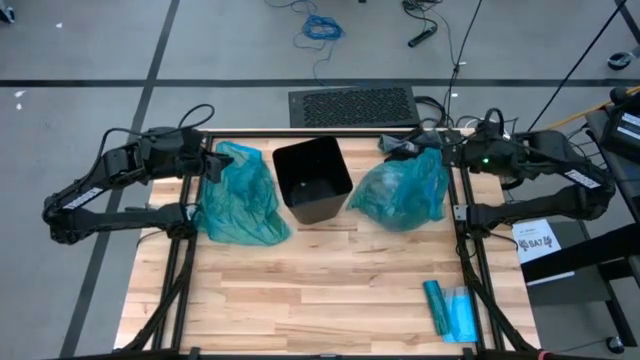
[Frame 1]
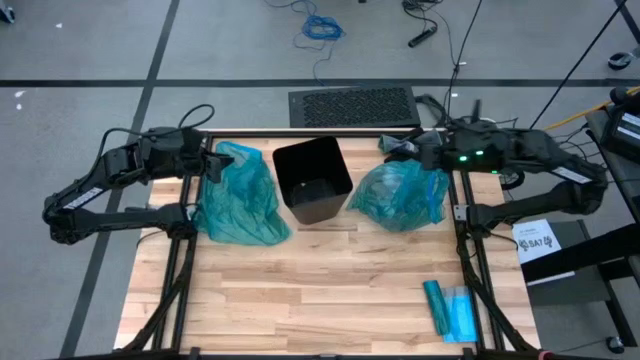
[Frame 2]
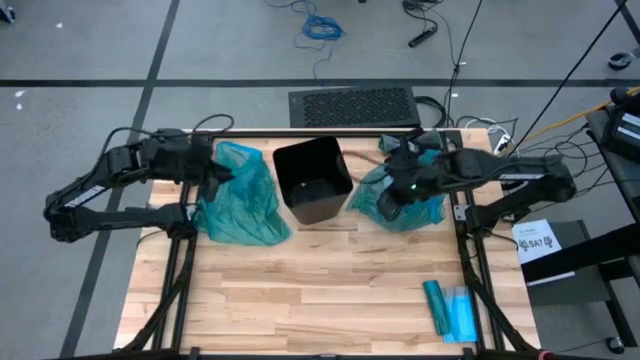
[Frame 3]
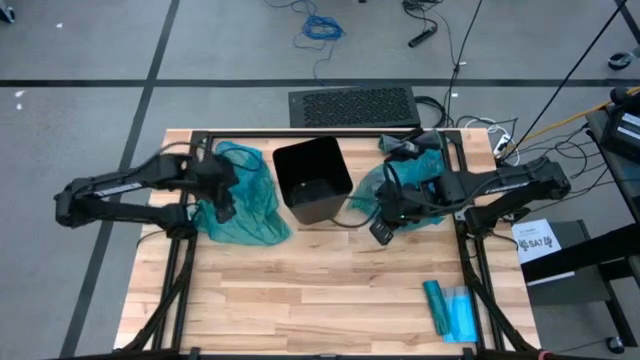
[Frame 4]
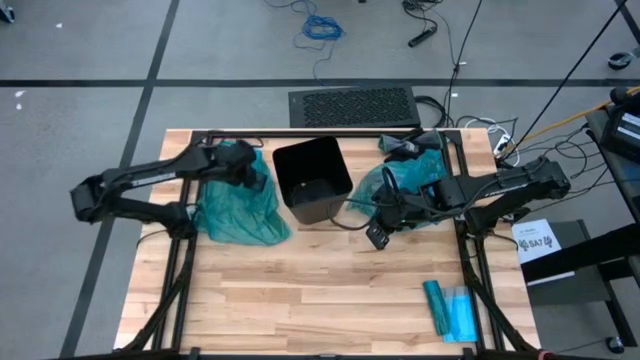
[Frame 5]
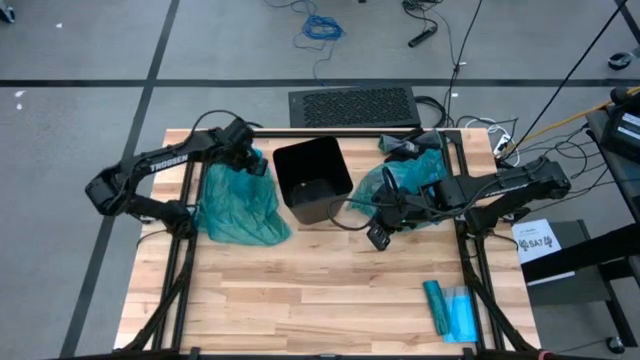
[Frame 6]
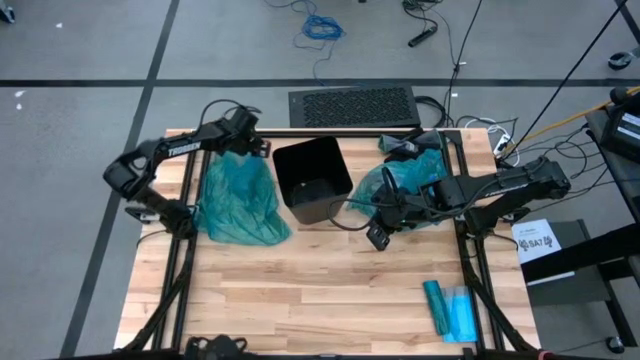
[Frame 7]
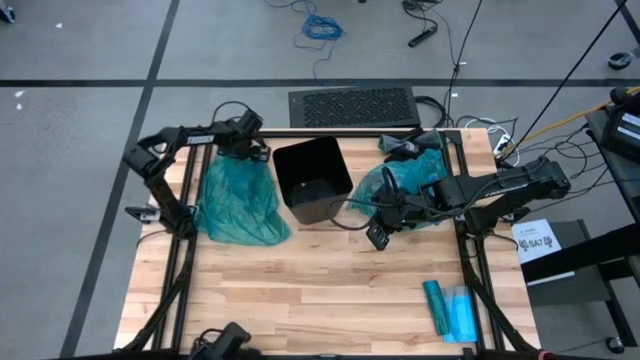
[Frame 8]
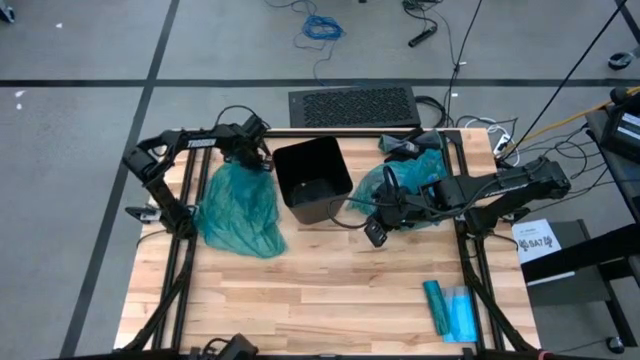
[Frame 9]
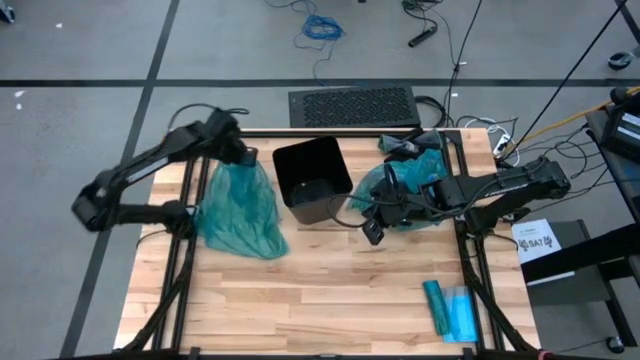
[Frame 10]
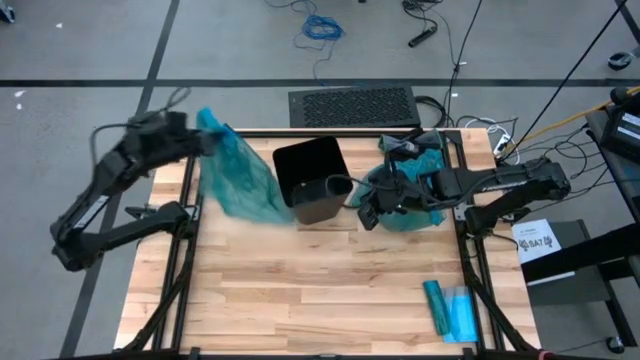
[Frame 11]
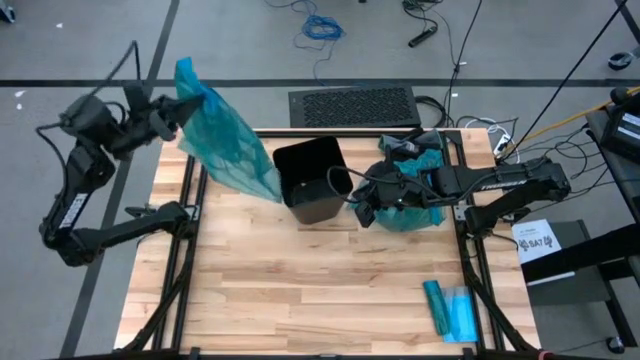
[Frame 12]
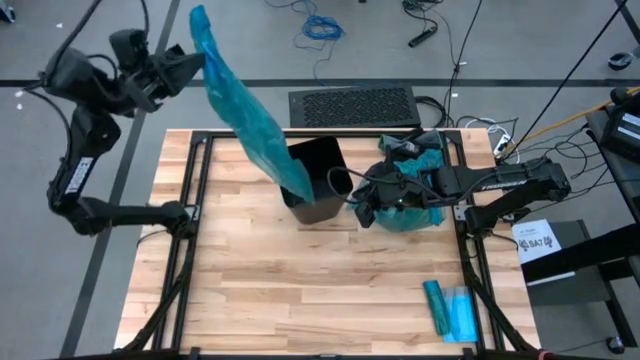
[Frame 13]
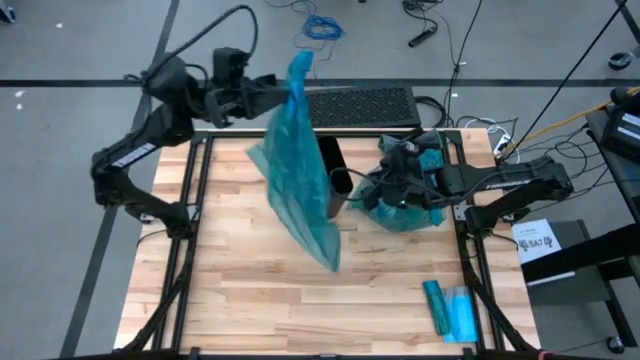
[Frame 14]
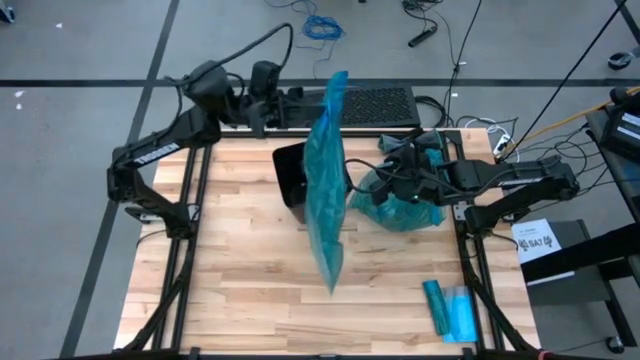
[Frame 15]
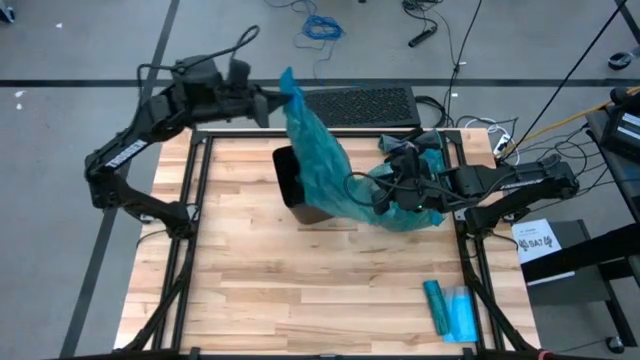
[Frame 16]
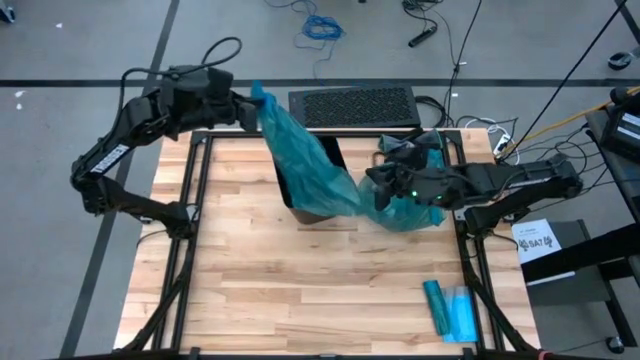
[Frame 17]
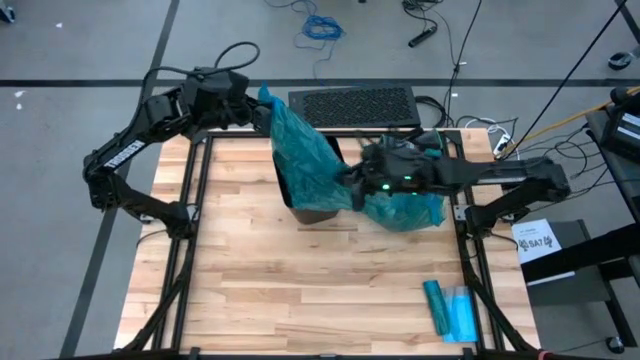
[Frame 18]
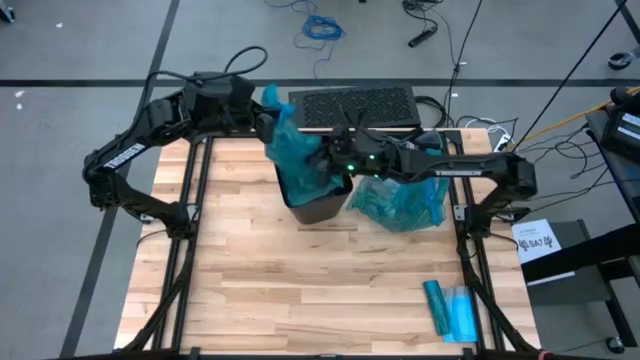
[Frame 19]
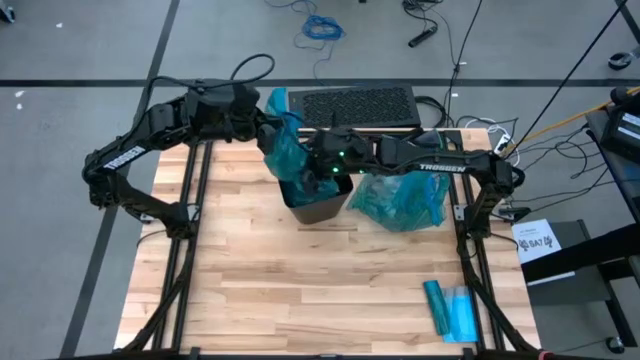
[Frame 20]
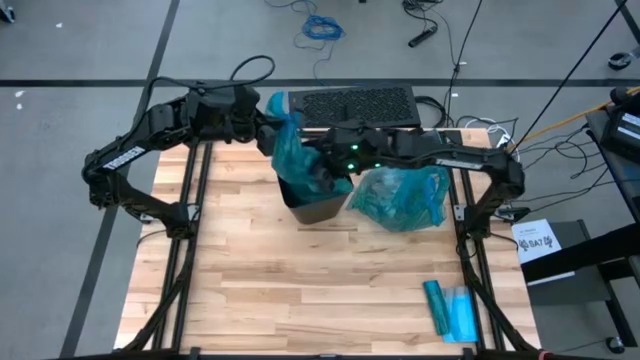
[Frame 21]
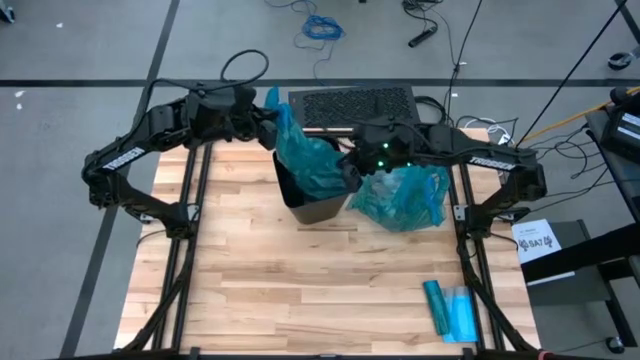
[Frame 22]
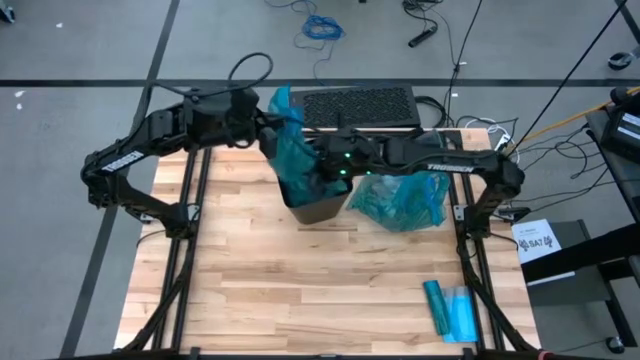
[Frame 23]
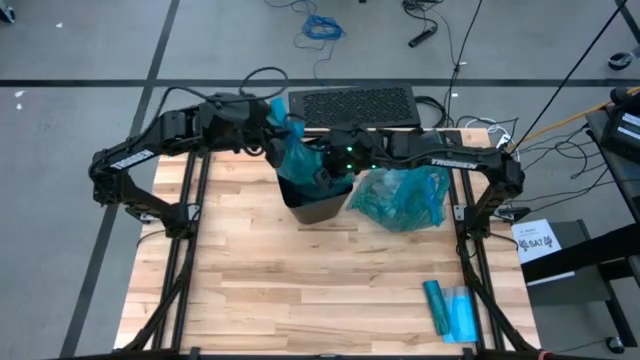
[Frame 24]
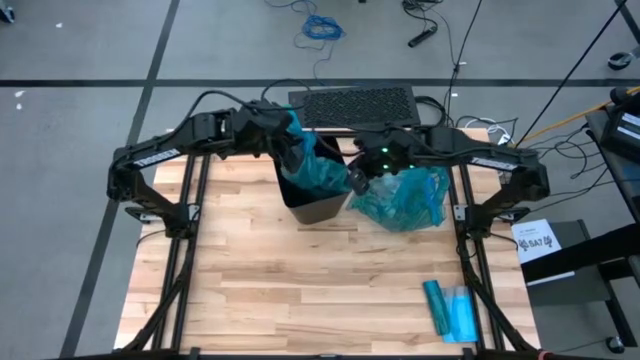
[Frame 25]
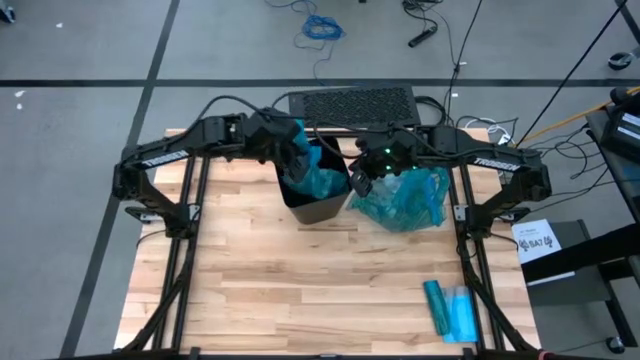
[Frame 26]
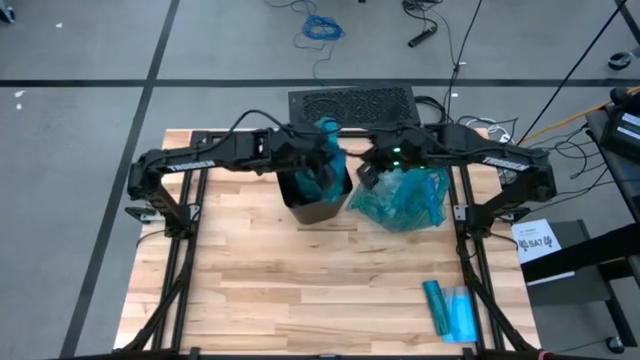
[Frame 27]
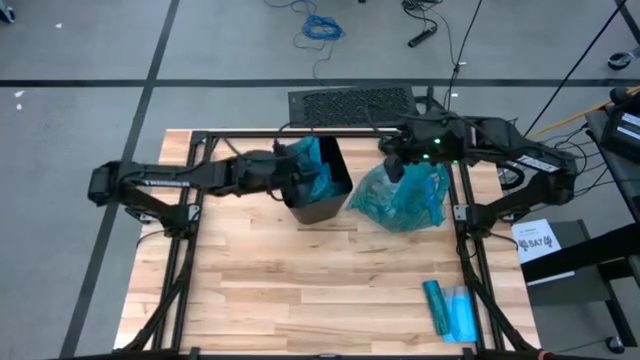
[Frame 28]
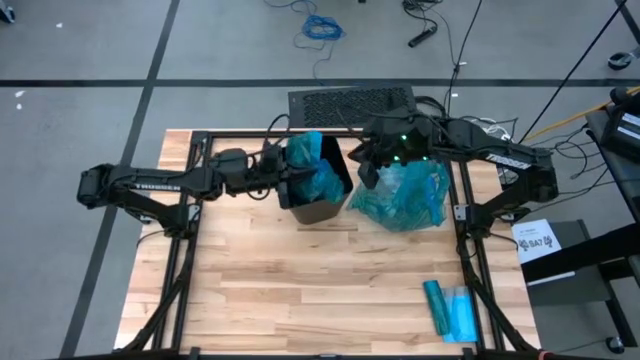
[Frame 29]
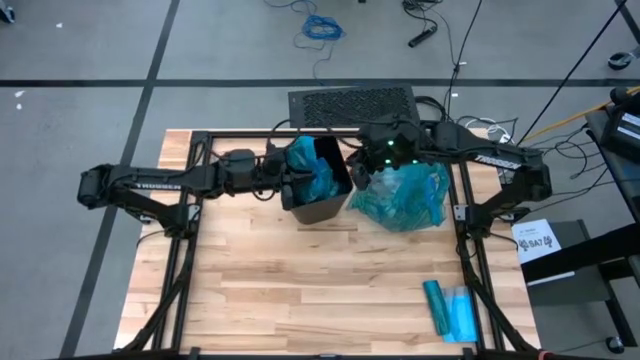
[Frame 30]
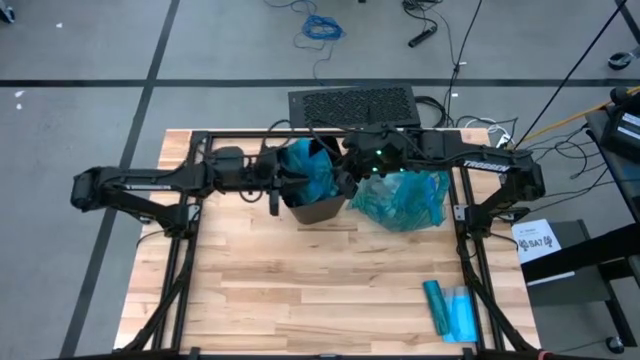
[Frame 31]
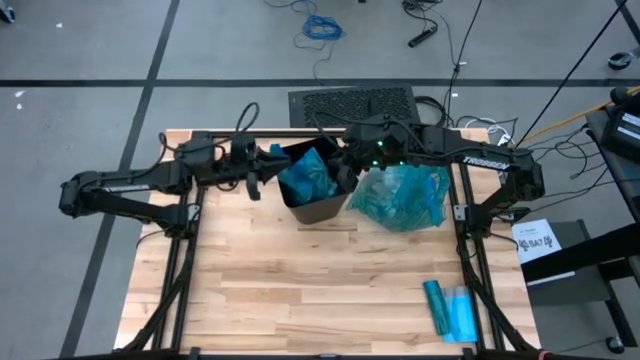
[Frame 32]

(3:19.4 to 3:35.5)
Task: place trash/remove bag and relplace
Insert the new trash bag into the trash bin

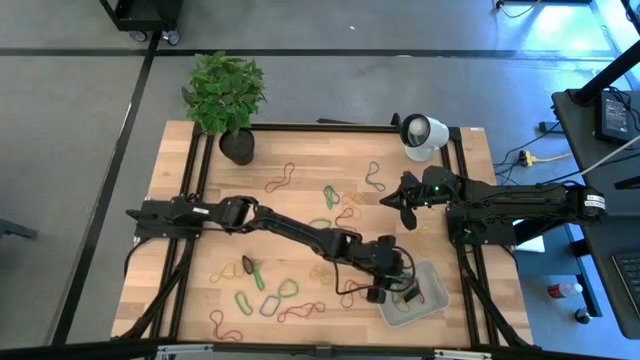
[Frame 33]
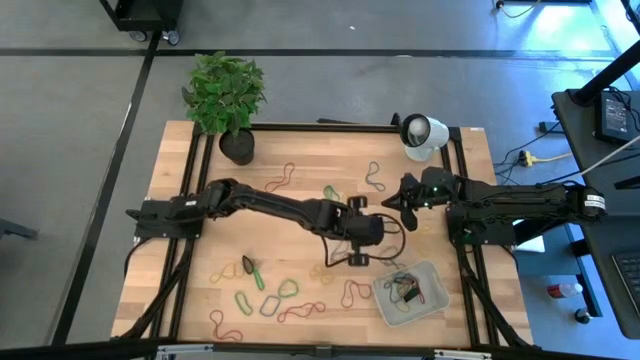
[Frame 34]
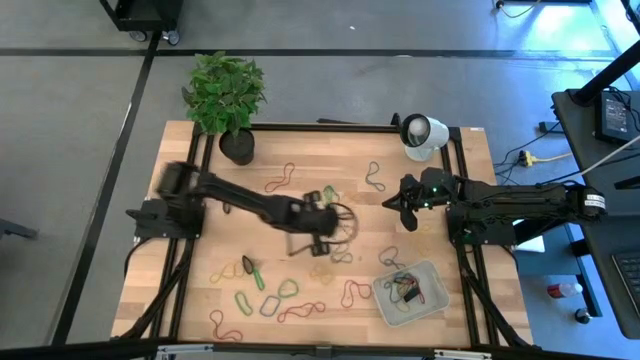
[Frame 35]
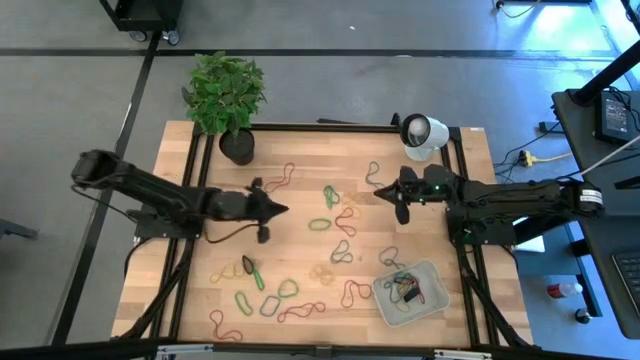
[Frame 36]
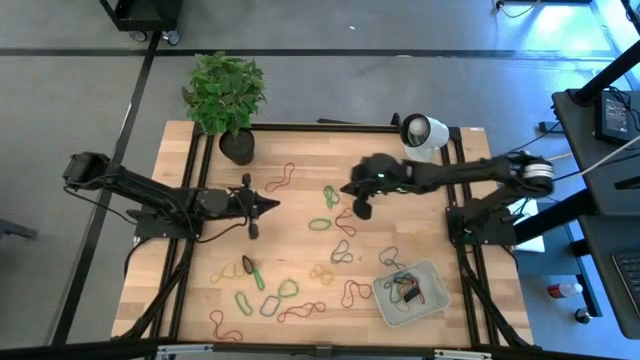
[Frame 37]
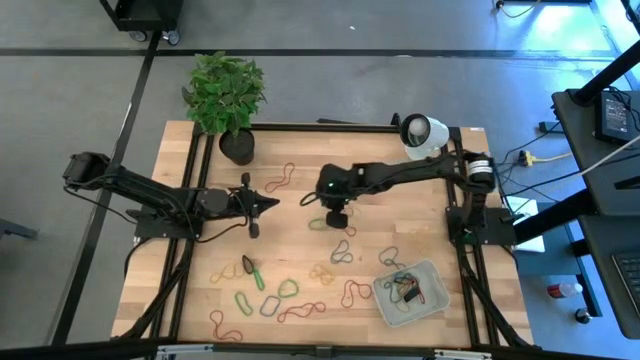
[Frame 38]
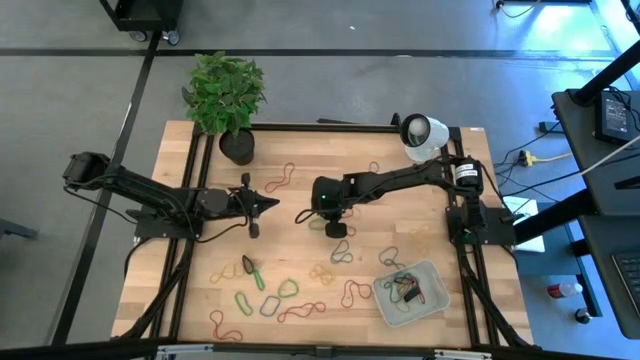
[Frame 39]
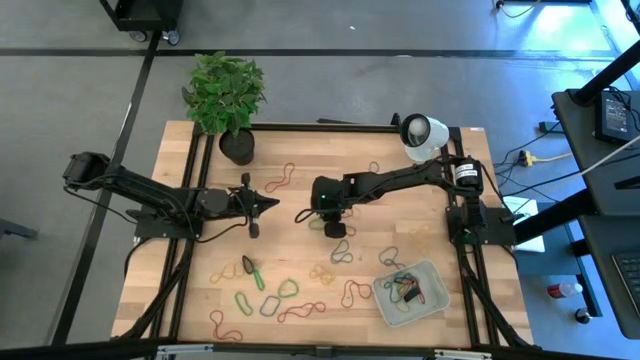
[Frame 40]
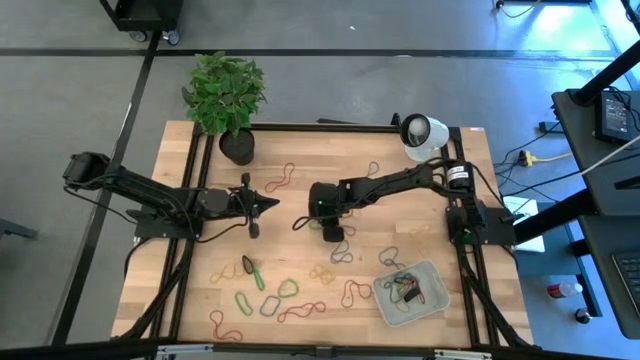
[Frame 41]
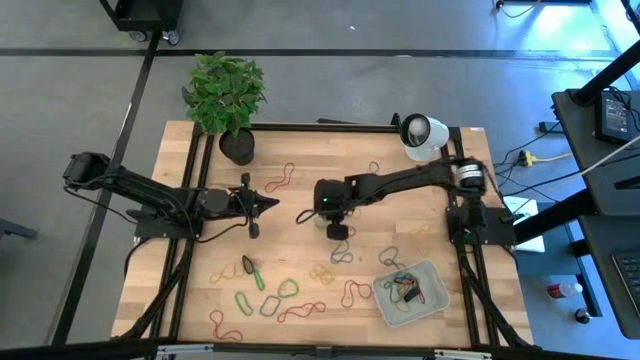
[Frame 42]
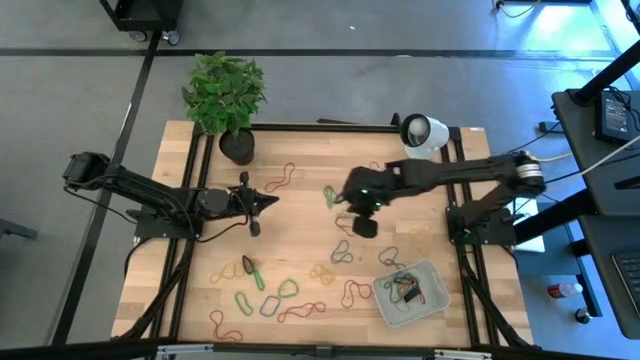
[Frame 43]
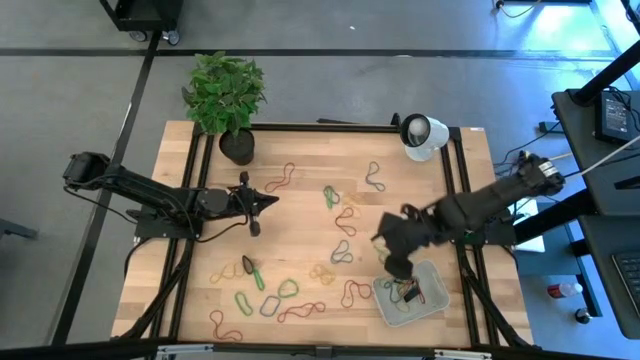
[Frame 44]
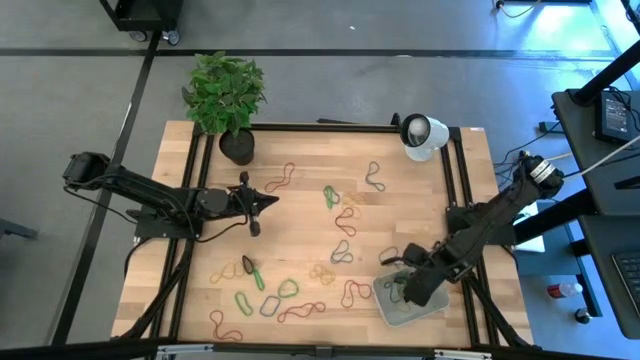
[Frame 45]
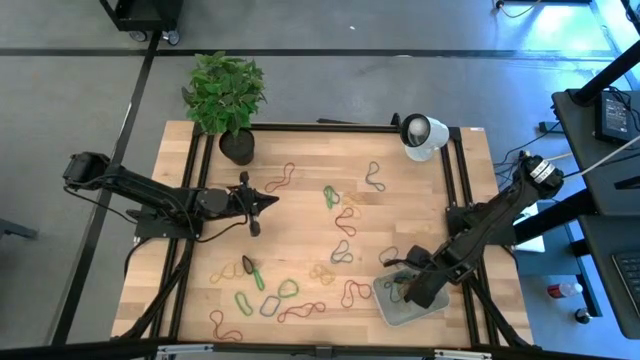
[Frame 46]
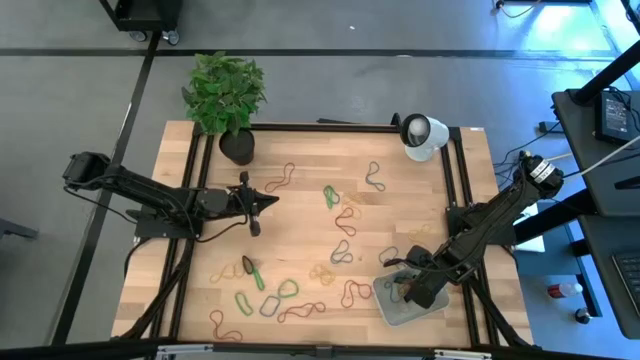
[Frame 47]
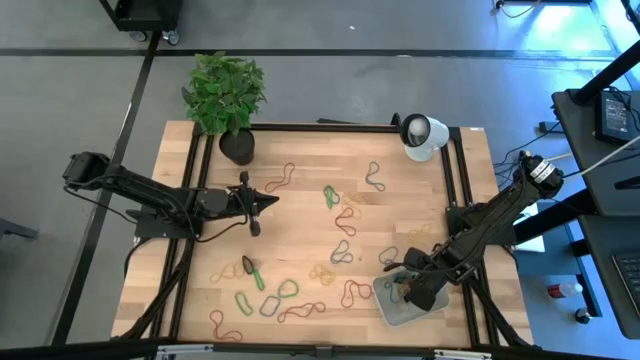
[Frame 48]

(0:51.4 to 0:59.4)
Task: Pick and place rubber bands into bin
Put the green rubber band into the white bin
